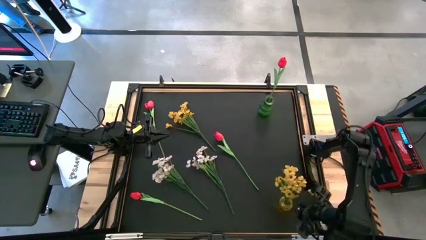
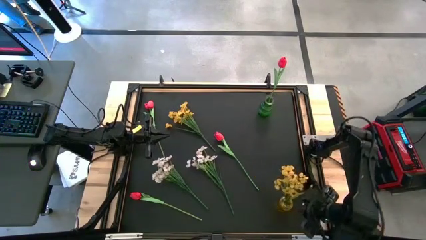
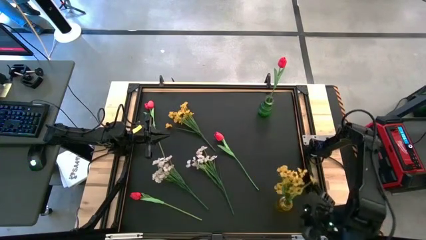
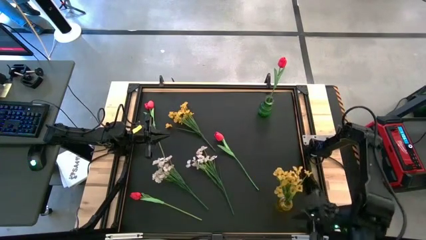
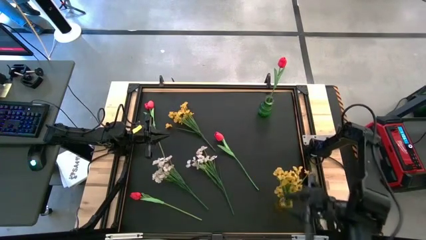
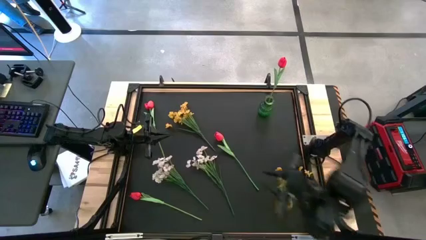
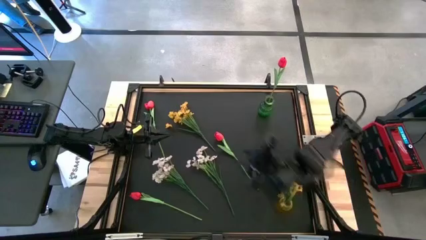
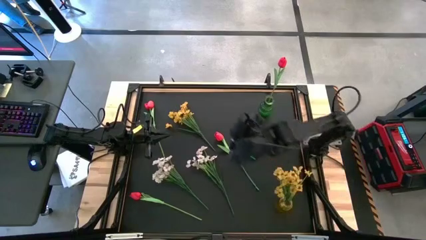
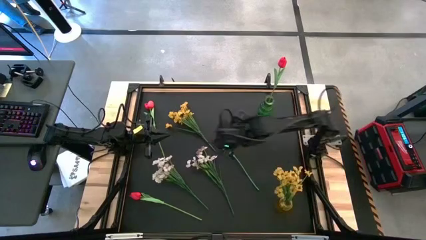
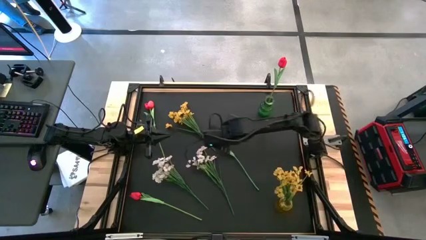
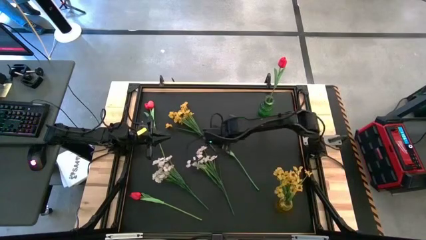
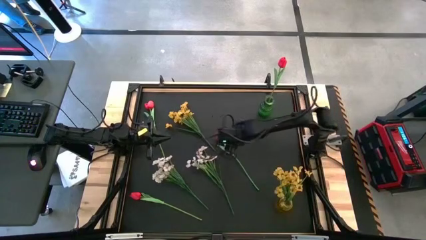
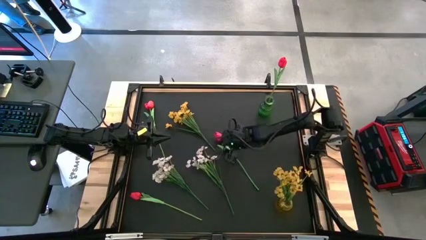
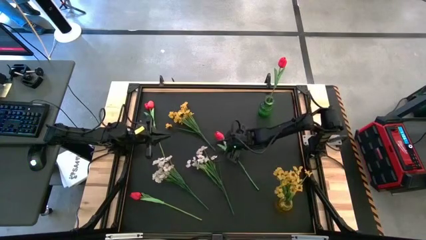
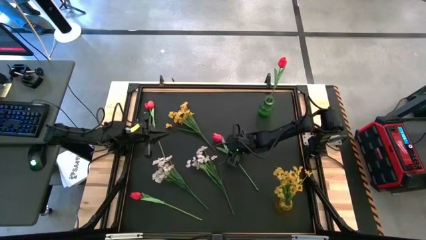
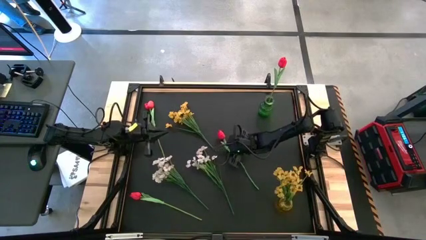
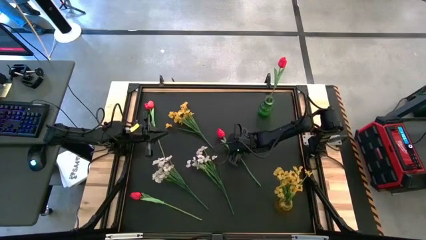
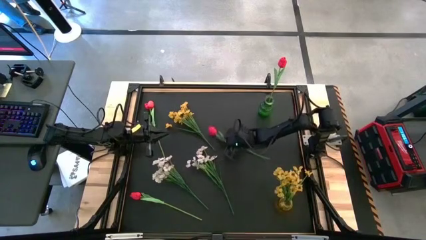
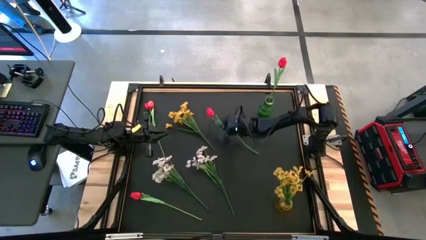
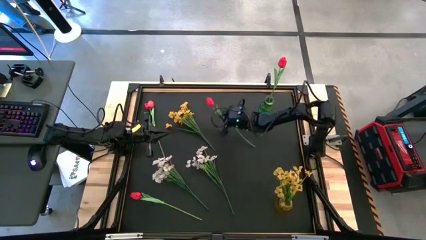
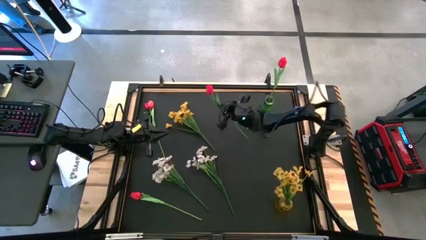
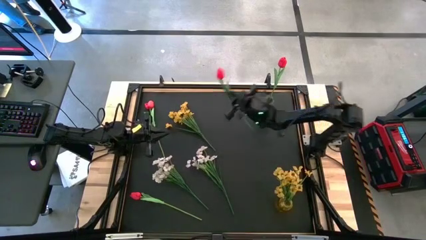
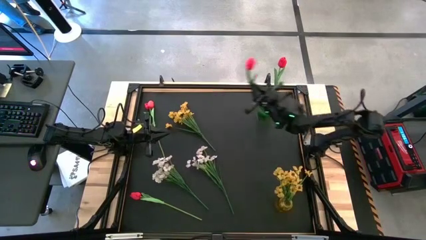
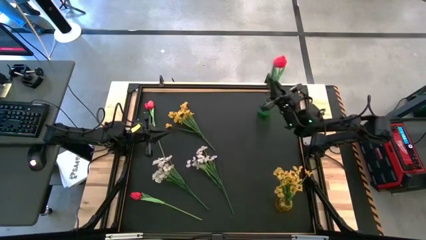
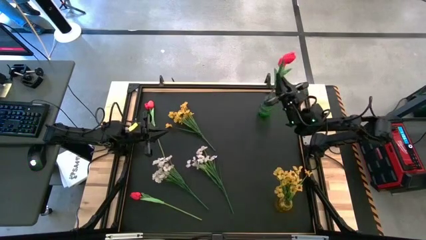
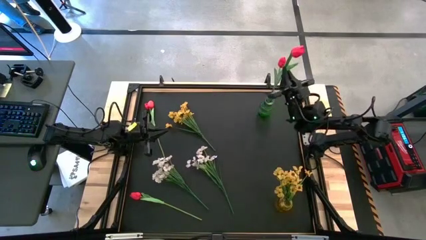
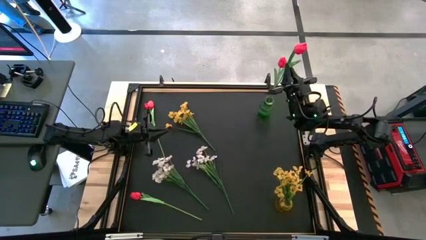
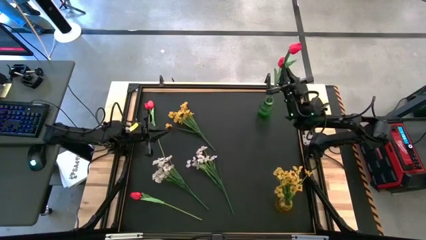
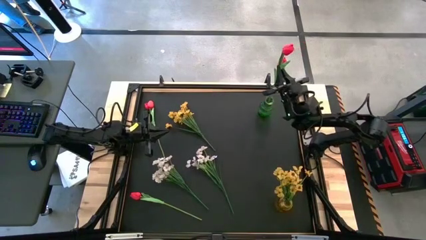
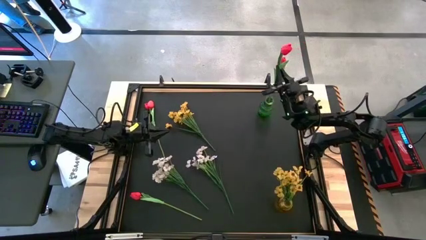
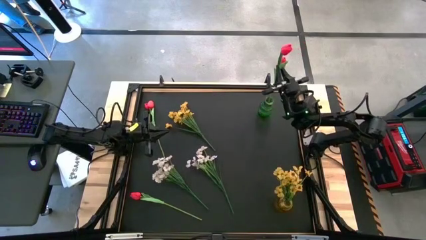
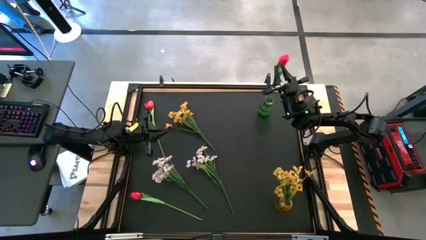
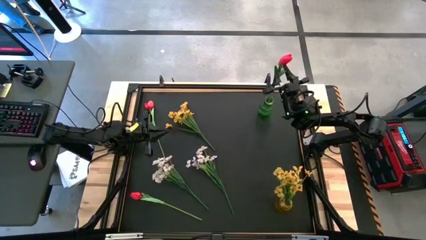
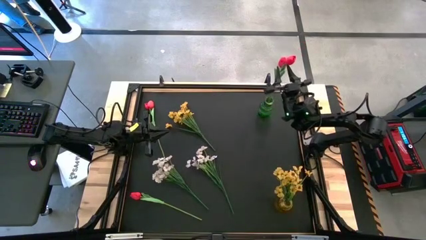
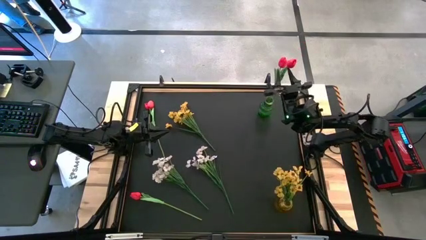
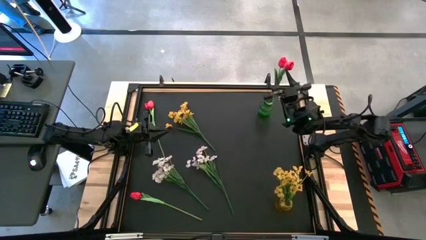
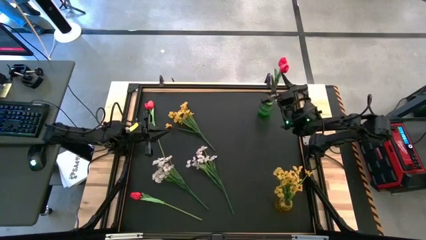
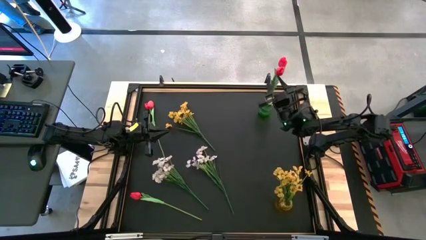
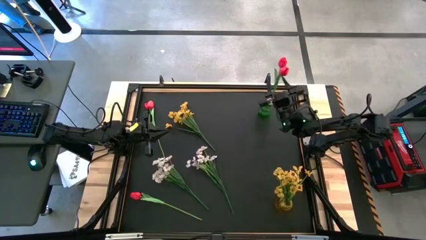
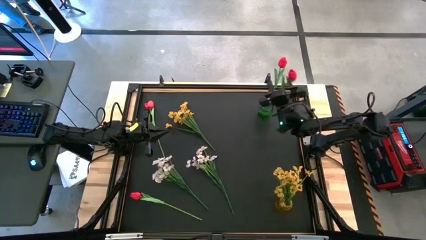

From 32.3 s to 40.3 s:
Task: Sort flowers into vase by color
Put the bottom right red flower into the green vase

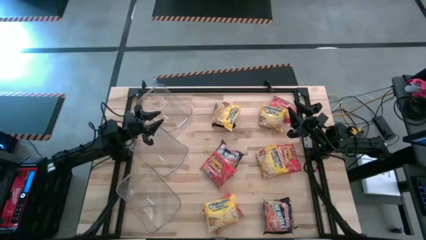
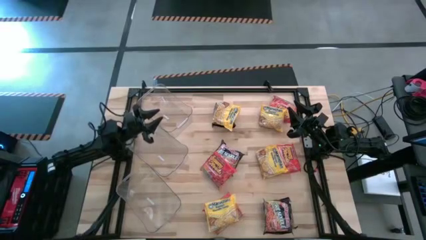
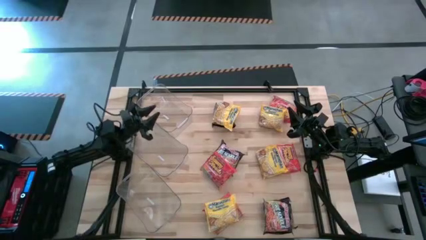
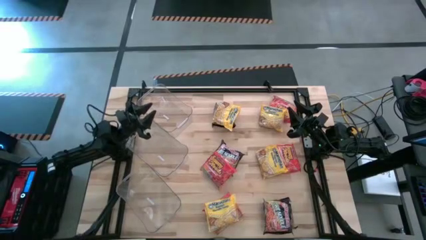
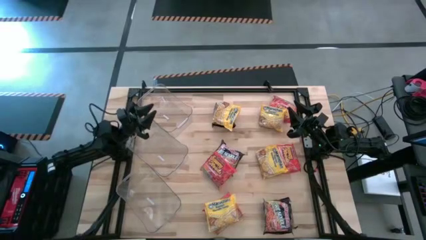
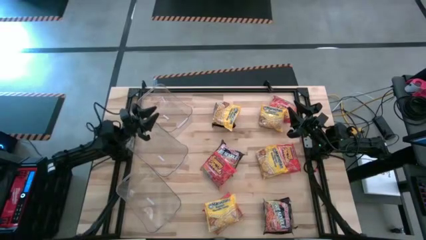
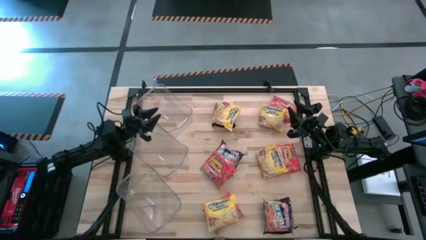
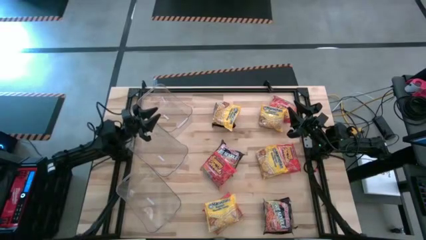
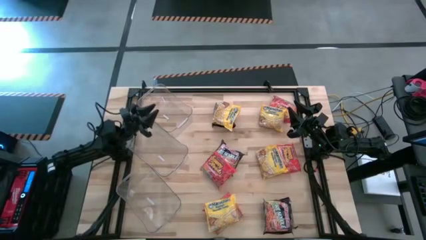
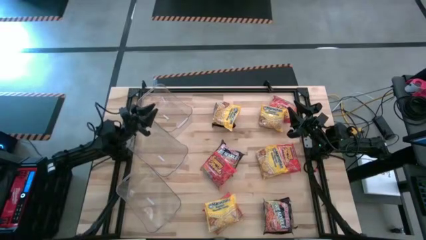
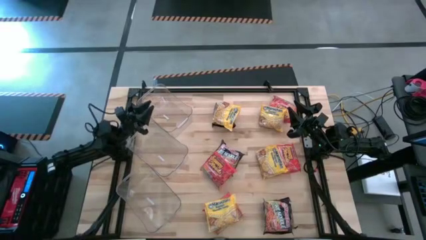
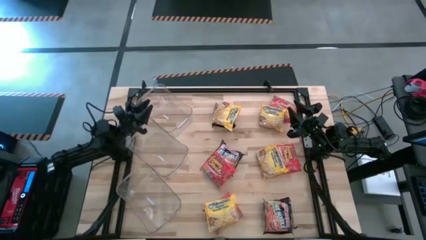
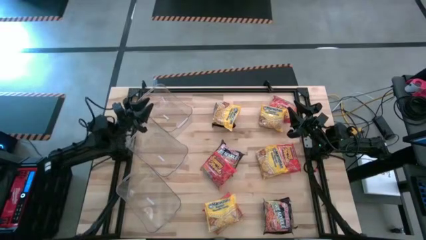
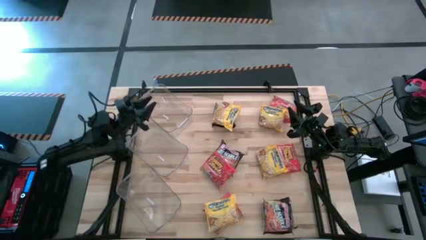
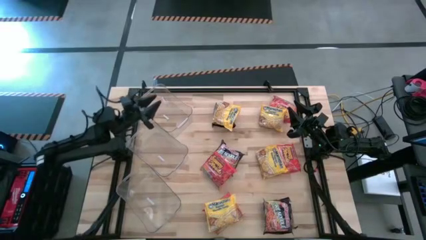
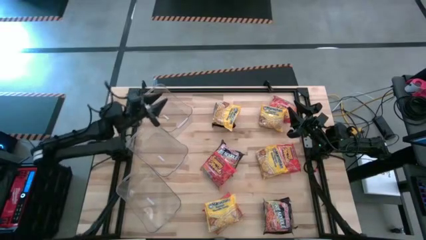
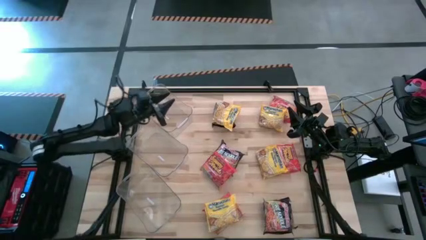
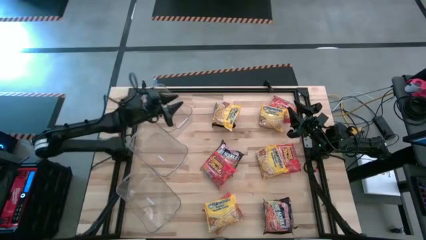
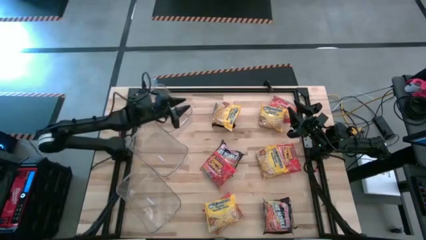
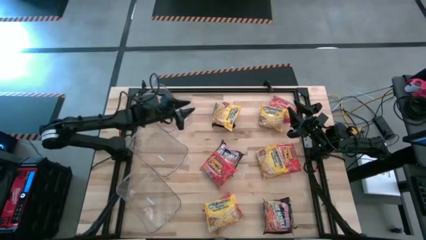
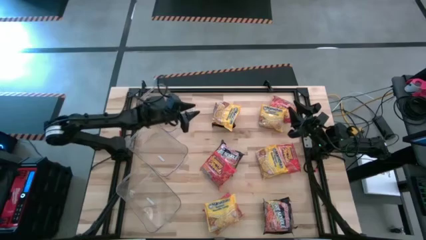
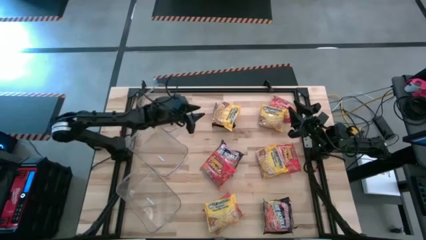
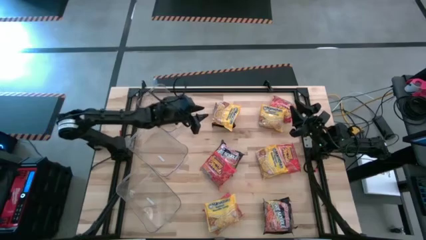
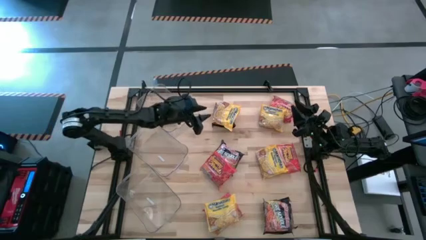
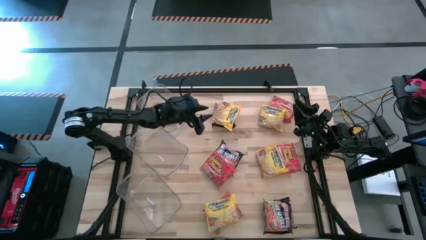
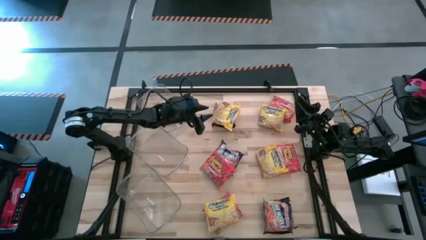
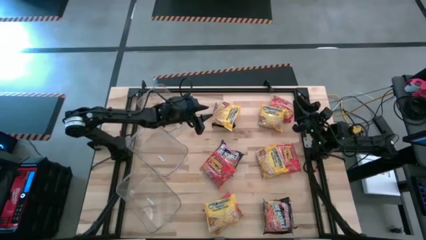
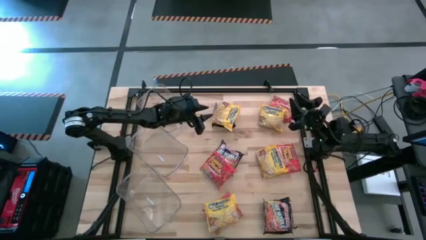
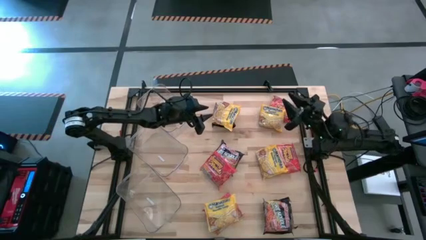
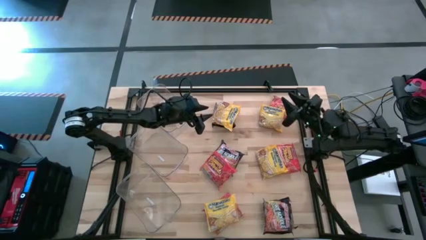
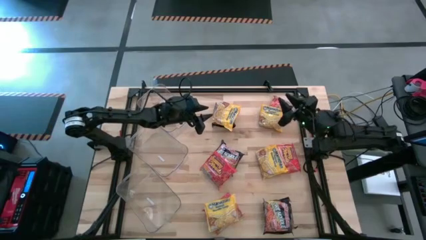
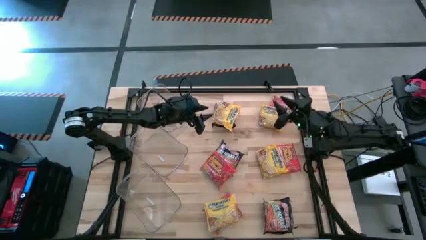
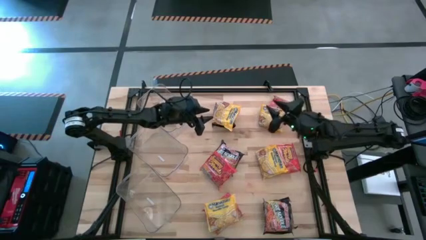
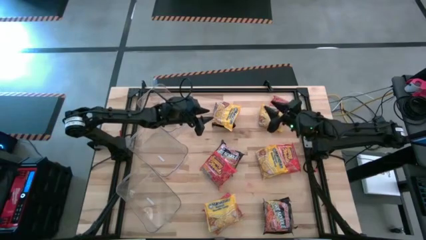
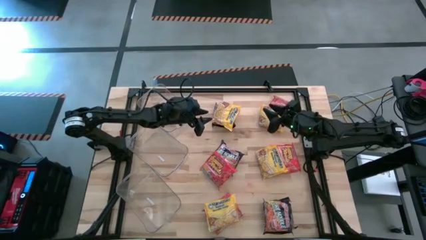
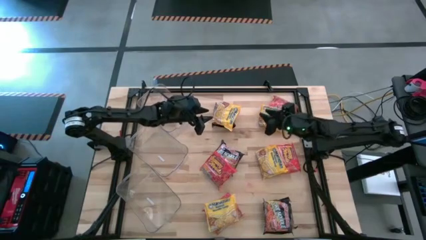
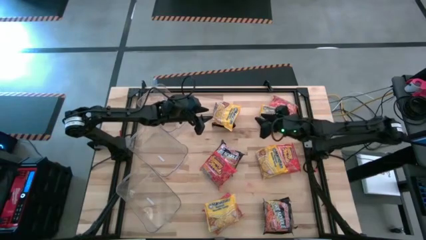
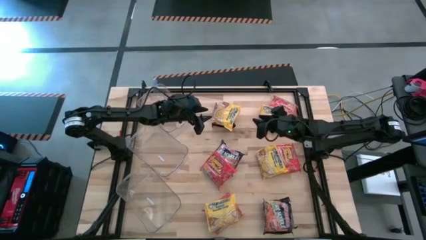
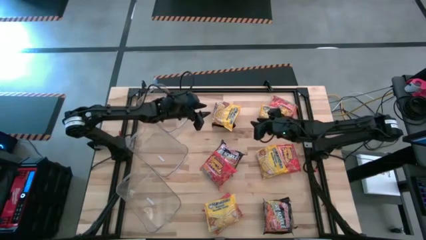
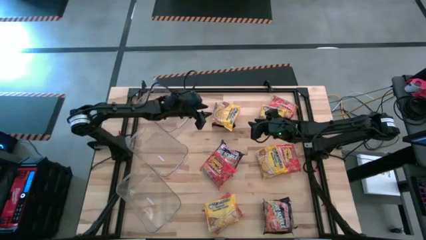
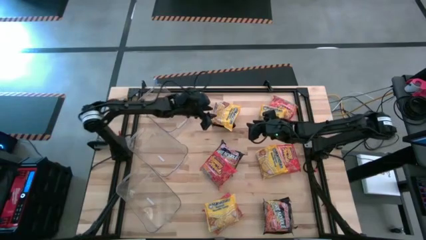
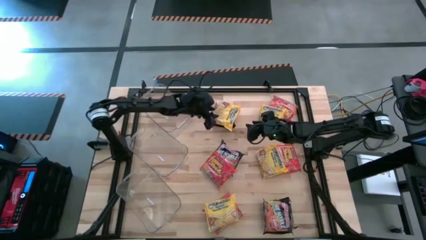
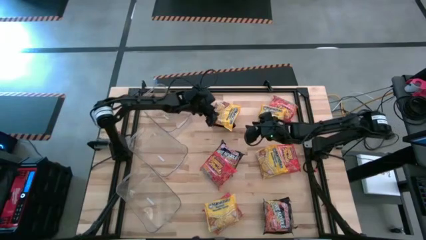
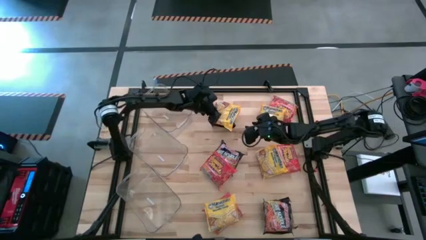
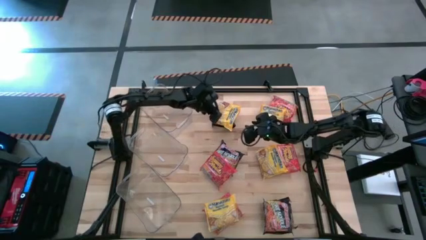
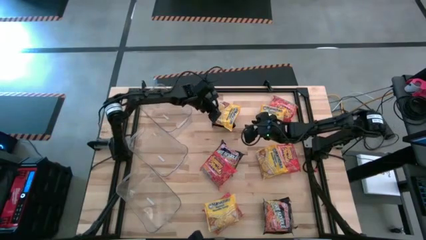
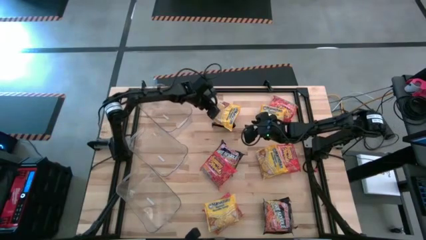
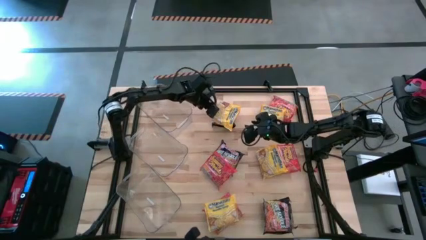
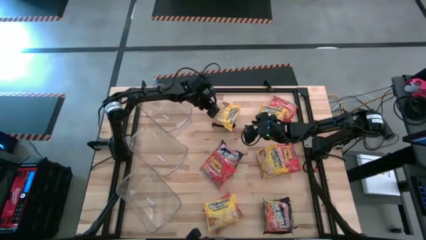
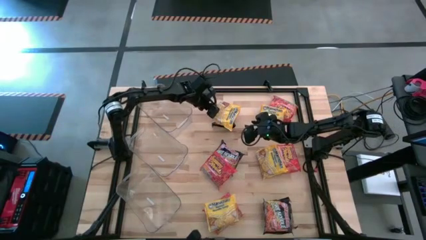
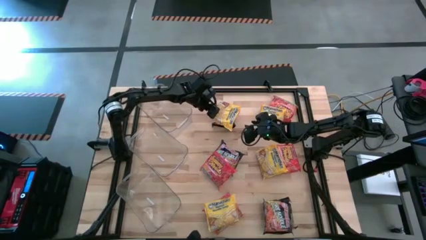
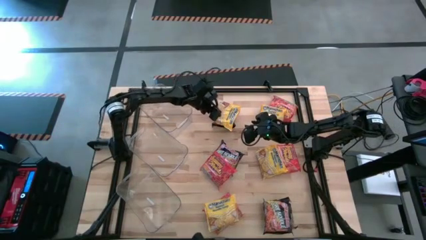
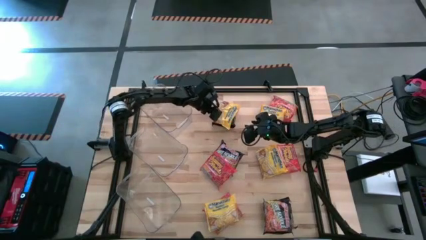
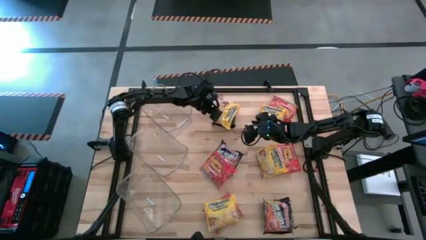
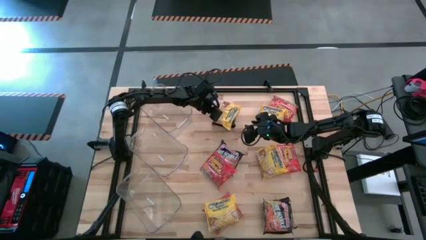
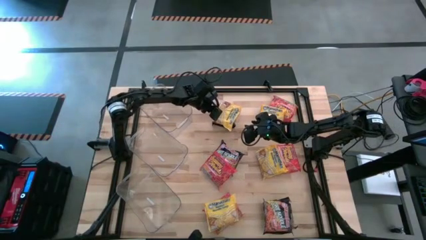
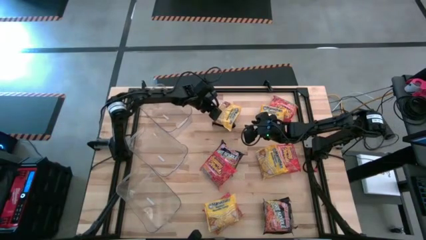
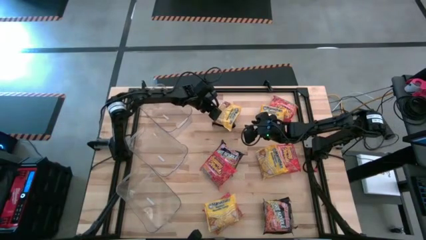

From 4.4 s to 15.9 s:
Task: Sort Maruchan noodles
Put the yellow noodles pack into the top transparent bin
